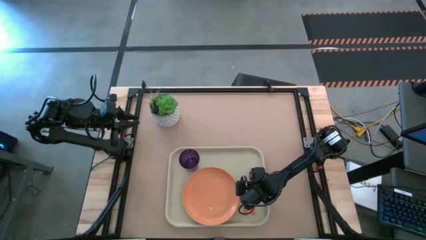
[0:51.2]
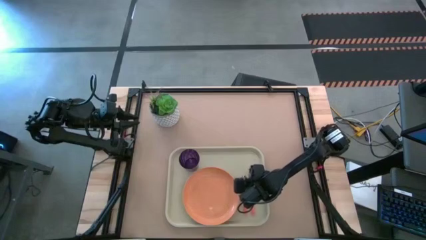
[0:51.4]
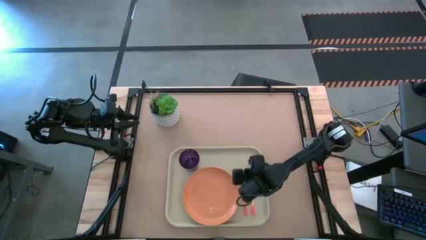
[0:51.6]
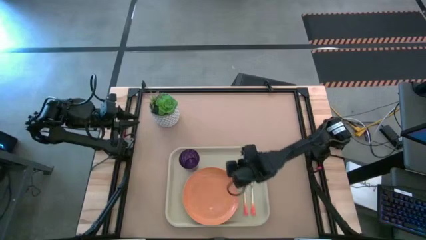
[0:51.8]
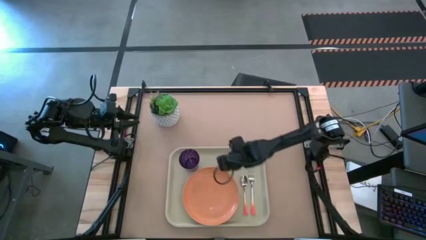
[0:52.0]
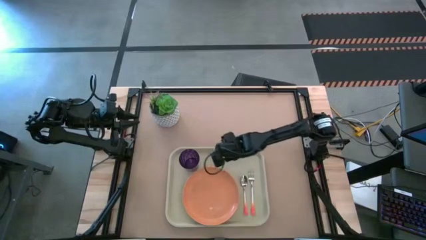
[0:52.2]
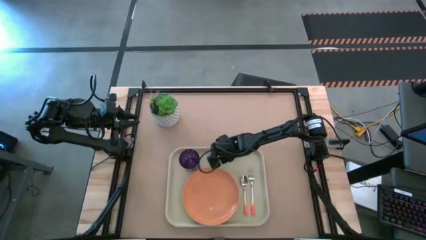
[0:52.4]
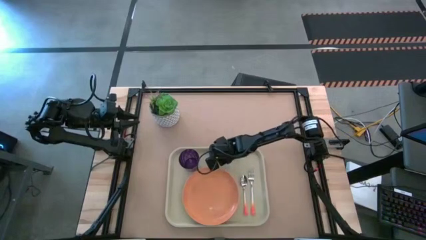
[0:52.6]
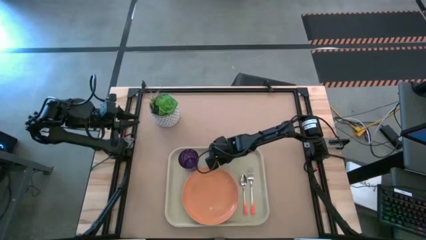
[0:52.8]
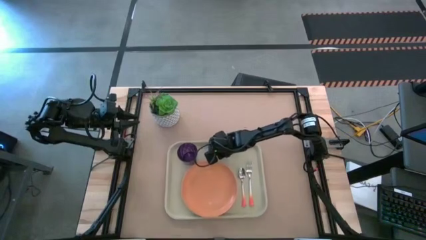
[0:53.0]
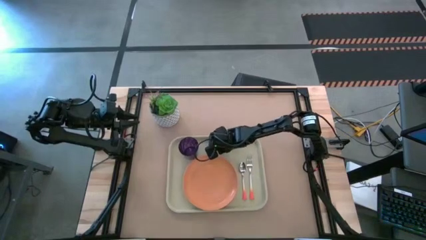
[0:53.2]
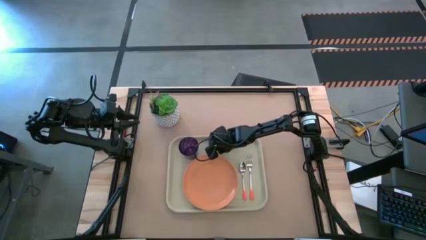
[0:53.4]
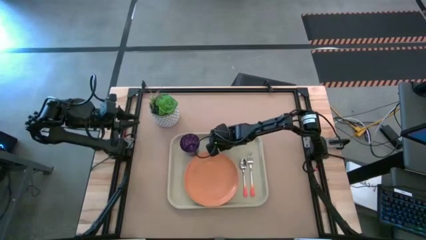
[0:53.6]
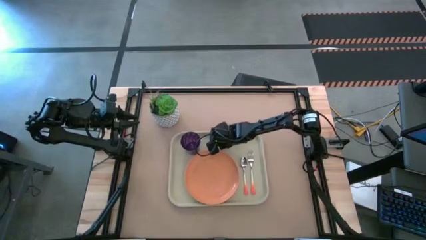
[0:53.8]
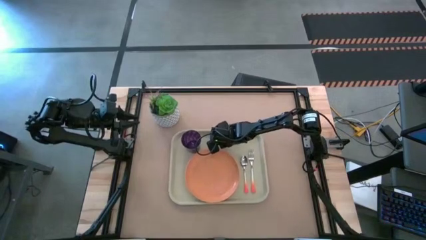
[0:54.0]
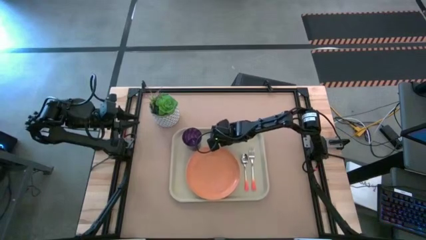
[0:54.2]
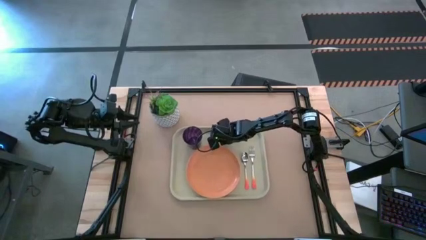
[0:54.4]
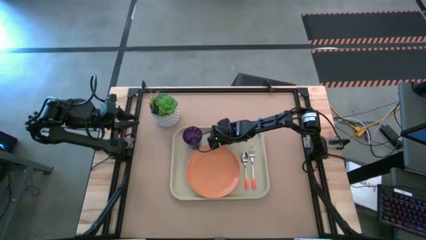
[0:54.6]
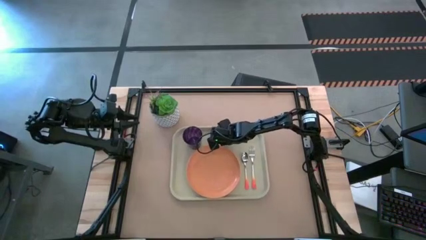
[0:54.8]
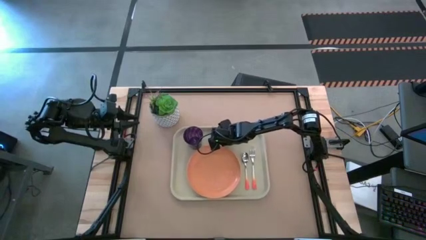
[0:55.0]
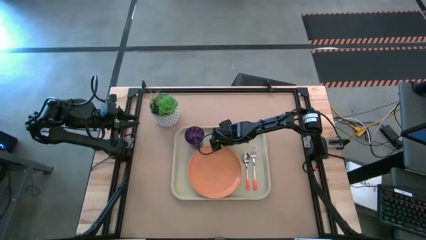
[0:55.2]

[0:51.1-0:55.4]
Task: Pick and place plate/cup/fork/spoon on tray
Move the gray serving tray to the center of the table

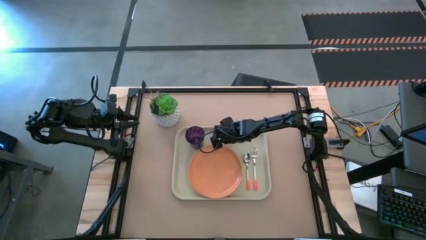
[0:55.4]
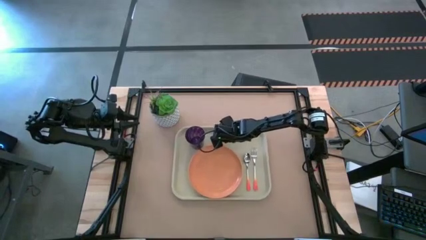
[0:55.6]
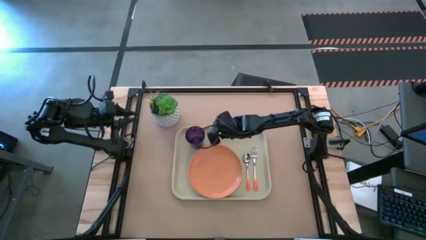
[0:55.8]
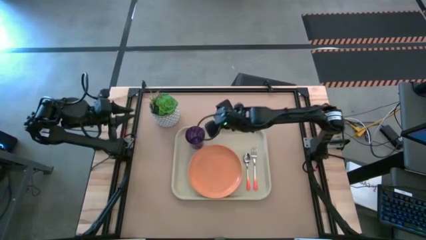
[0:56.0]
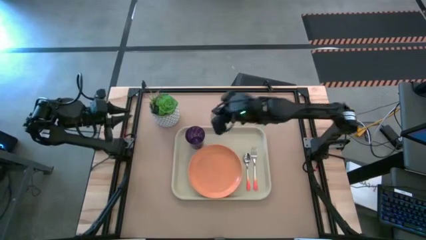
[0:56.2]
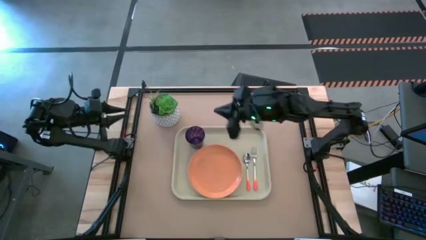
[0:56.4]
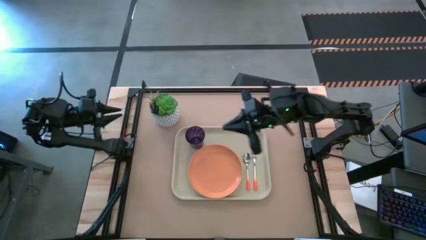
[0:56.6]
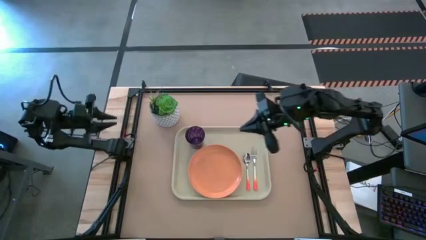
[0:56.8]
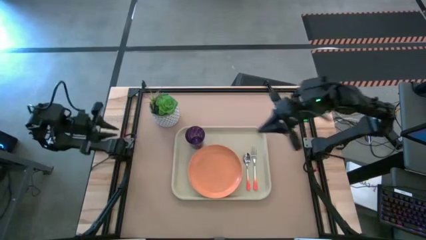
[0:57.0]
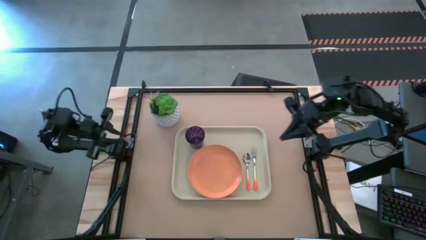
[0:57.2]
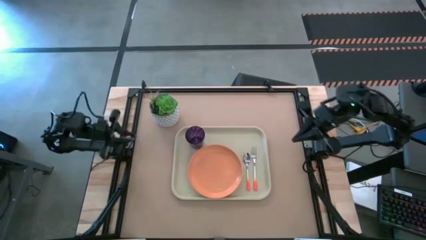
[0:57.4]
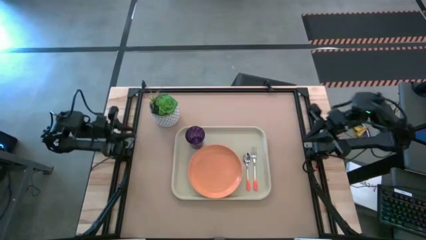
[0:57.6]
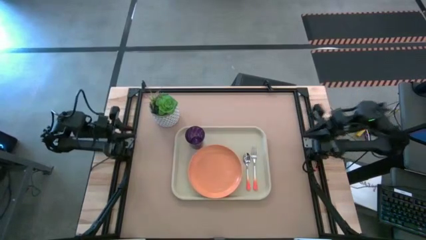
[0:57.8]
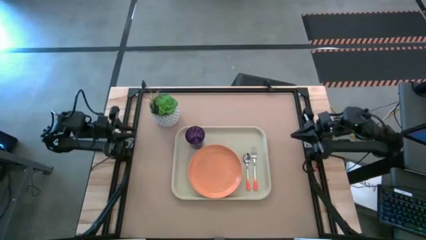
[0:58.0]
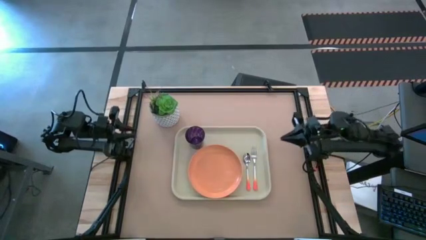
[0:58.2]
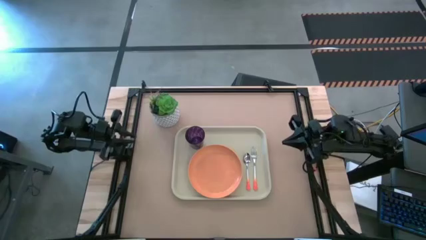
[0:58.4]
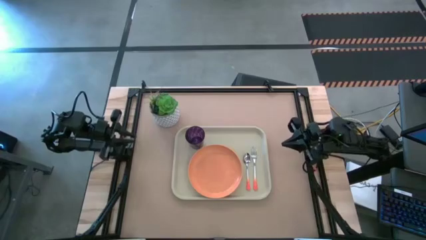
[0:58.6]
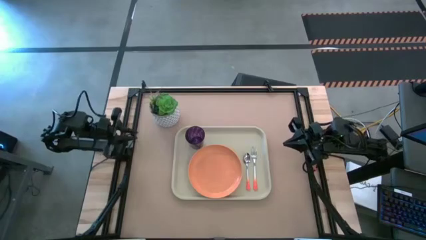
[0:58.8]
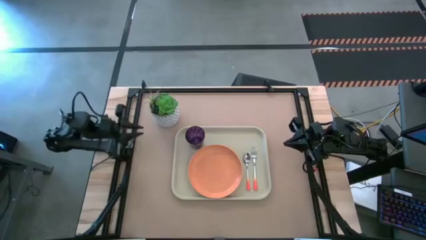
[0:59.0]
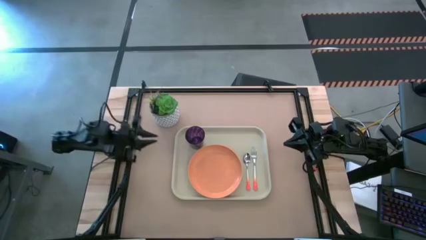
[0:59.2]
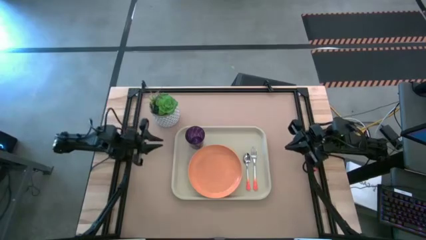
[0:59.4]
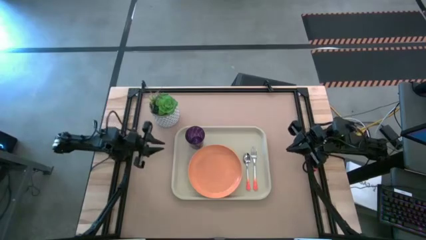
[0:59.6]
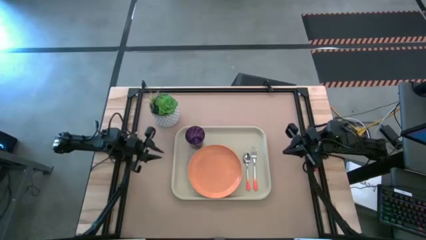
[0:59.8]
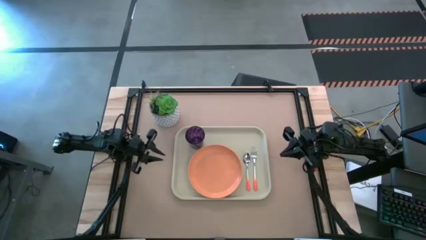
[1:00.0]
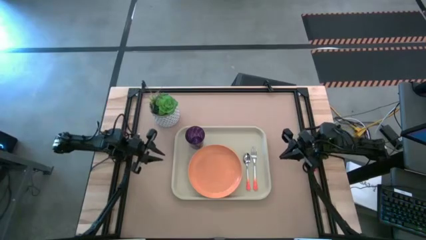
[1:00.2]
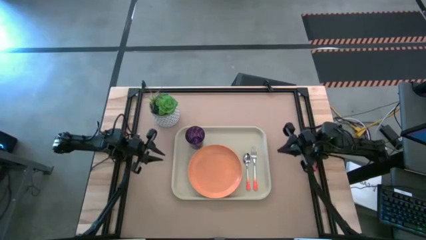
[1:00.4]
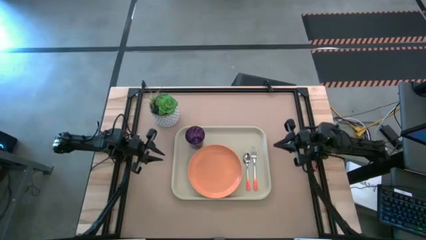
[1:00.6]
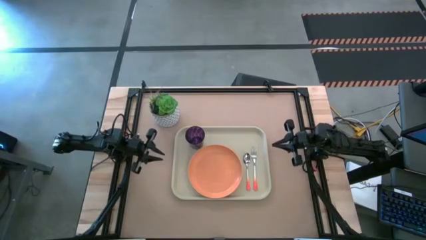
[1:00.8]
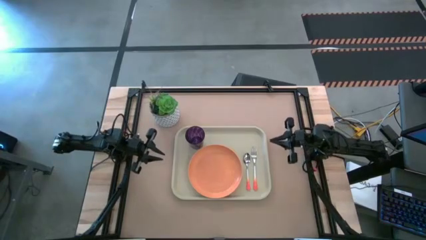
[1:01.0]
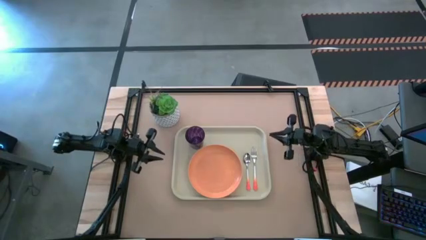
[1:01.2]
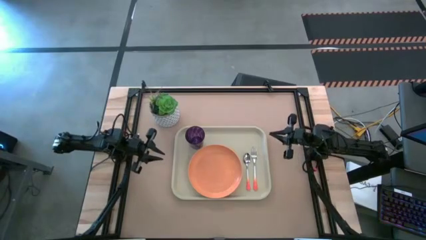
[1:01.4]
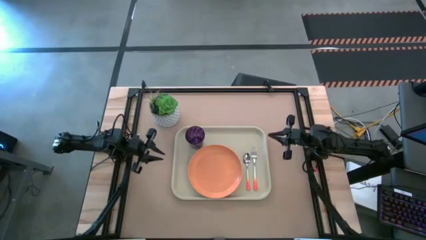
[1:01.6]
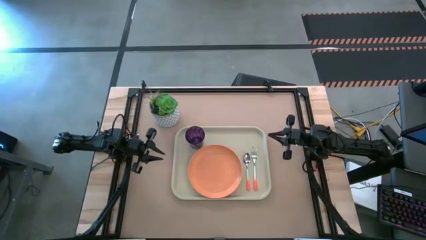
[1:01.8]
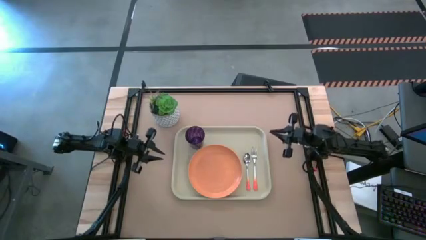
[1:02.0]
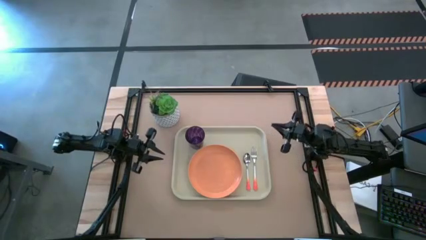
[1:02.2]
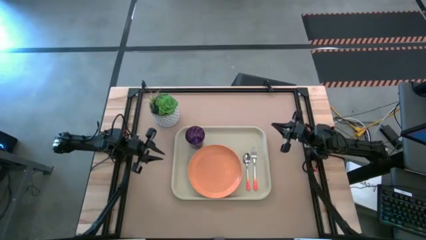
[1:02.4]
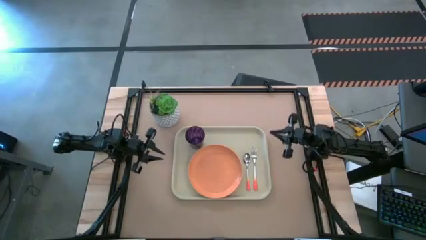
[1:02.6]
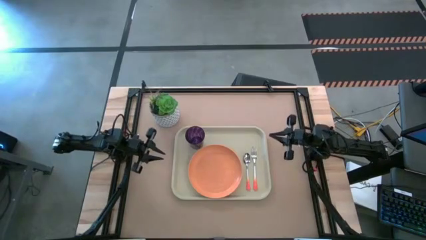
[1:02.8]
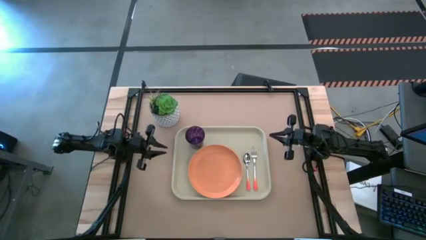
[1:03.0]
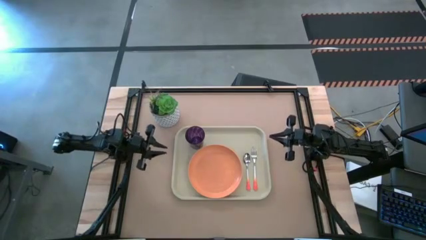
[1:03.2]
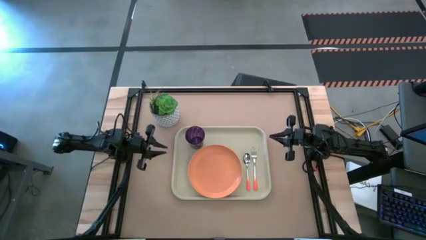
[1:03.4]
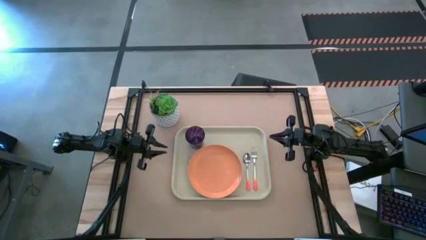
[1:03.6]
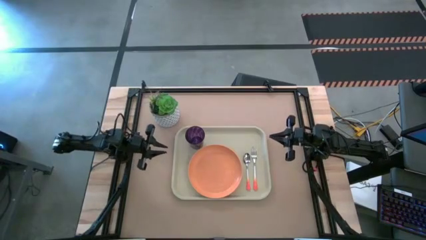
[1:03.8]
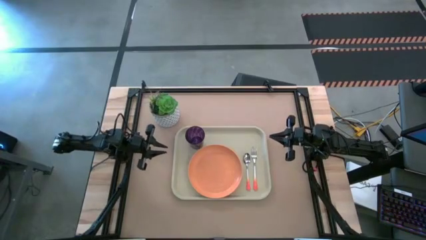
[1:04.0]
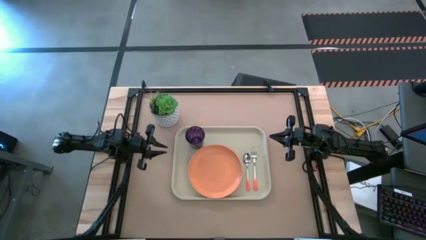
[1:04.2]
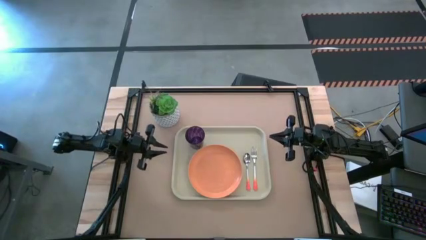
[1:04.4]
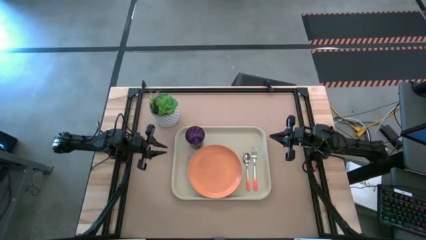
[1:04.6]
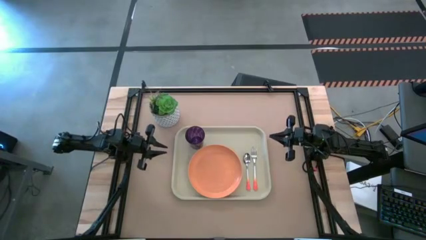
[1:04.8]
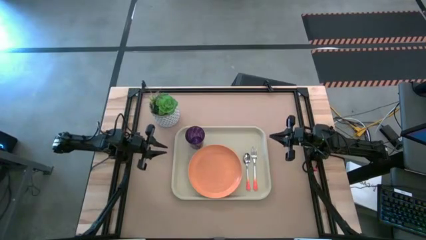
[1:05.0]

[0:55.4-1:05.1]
Return to Home Position
